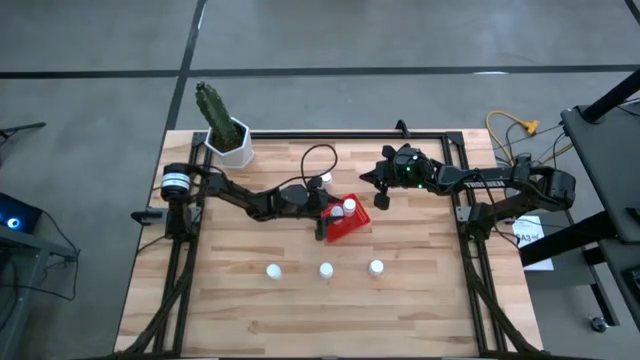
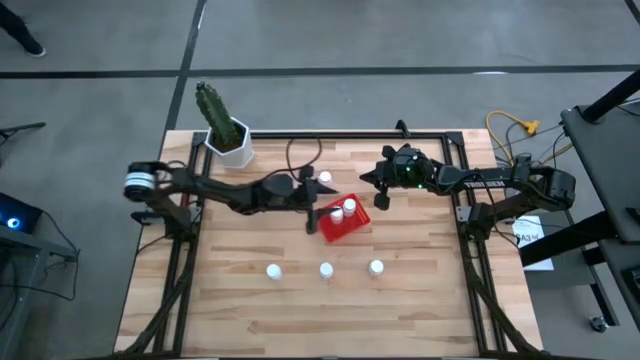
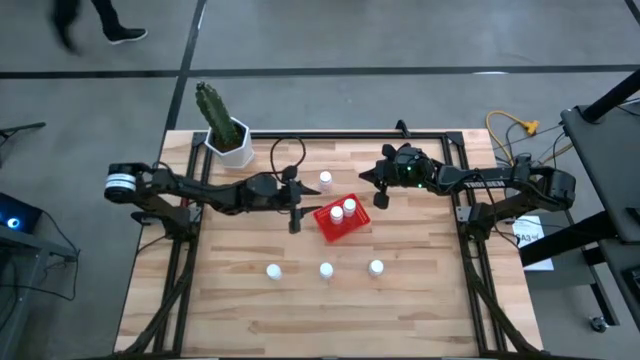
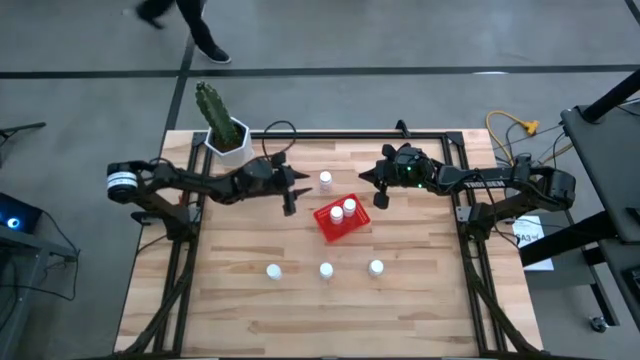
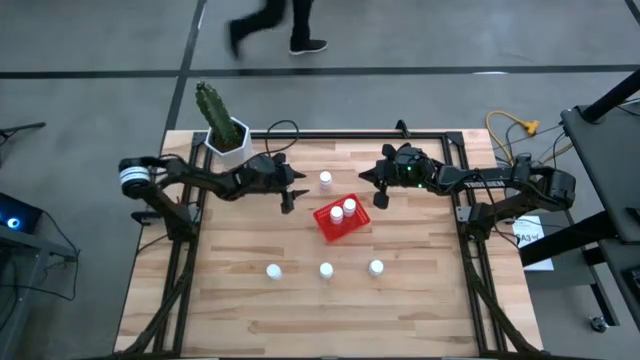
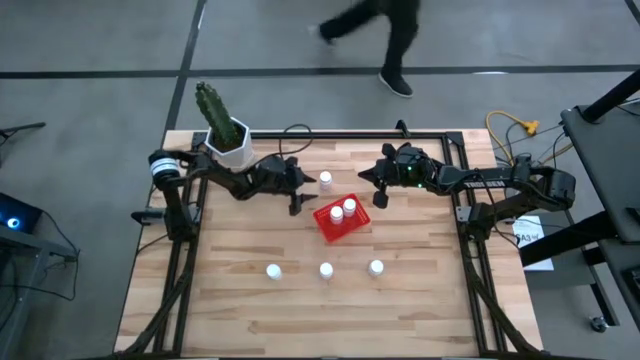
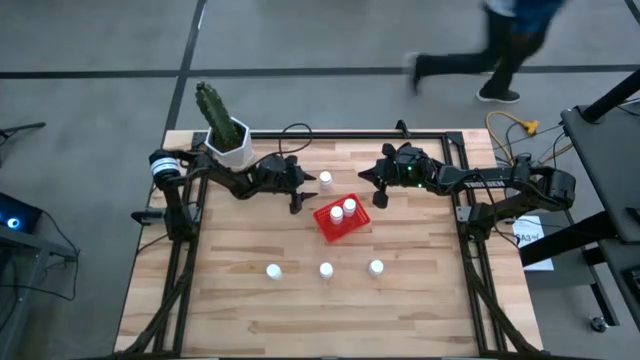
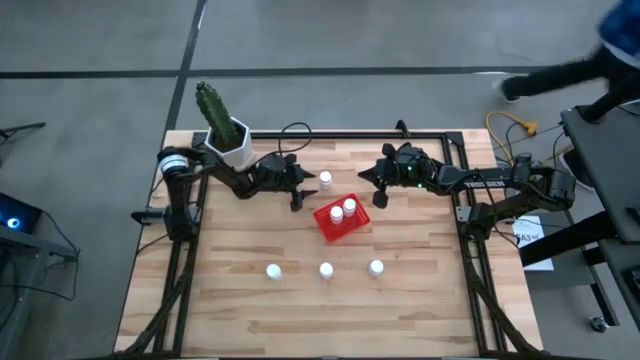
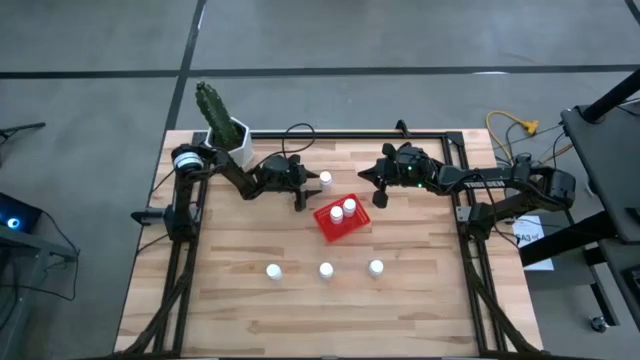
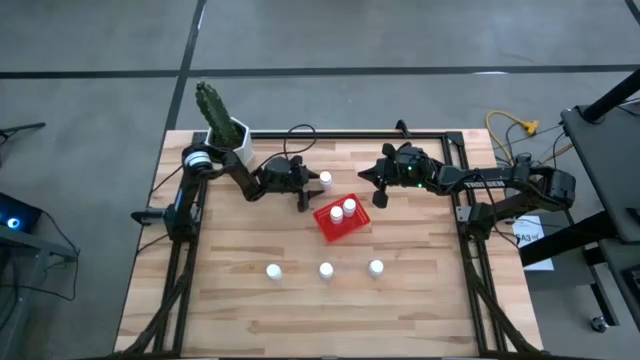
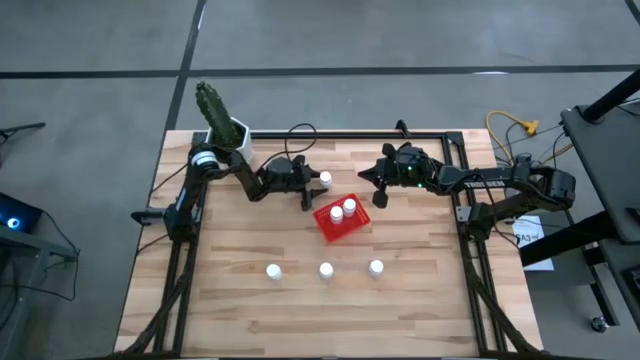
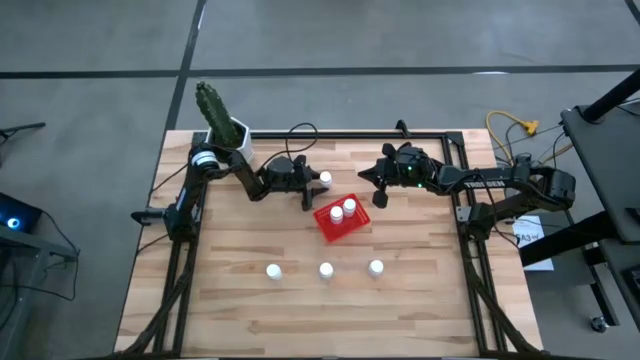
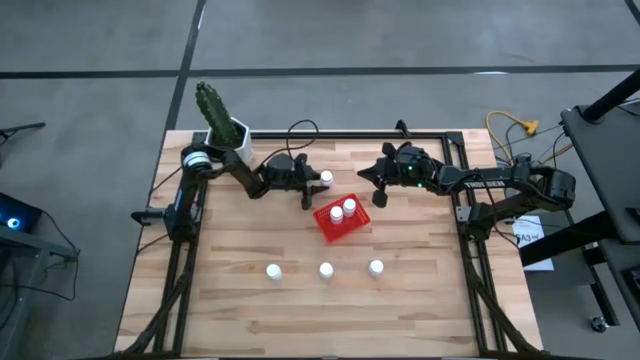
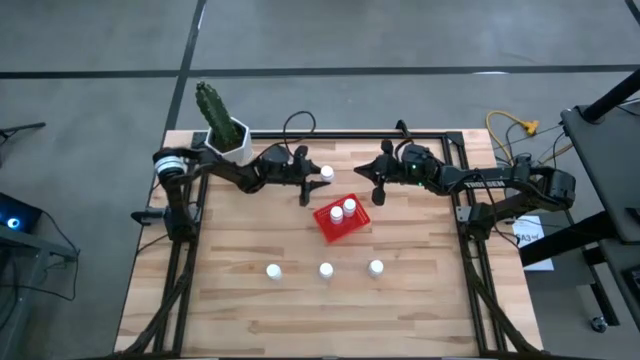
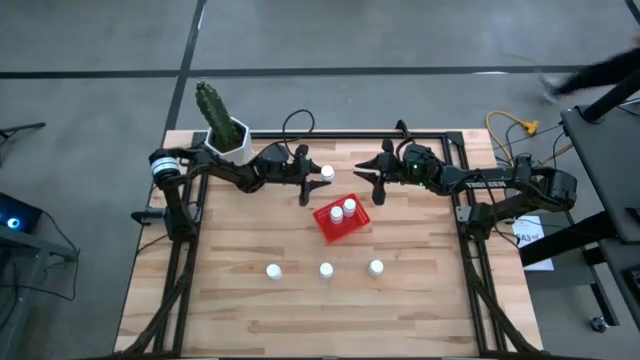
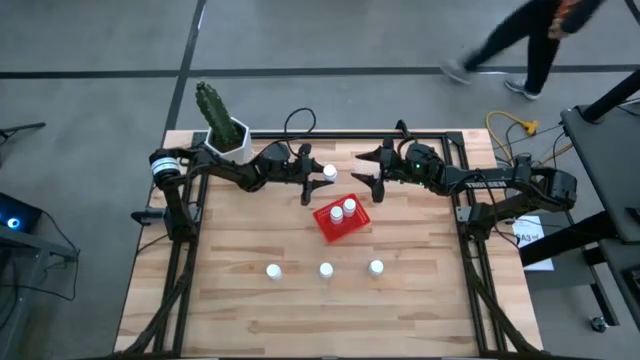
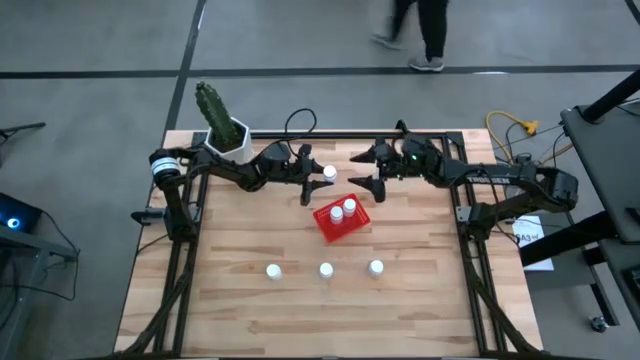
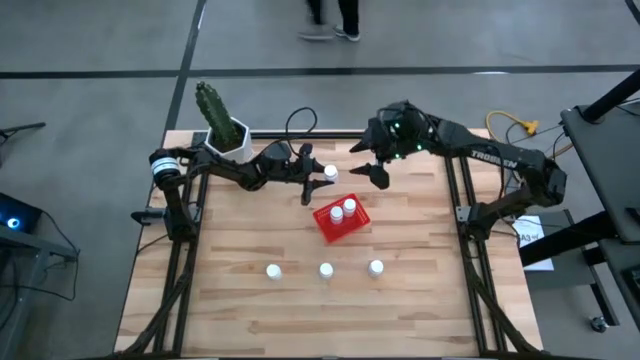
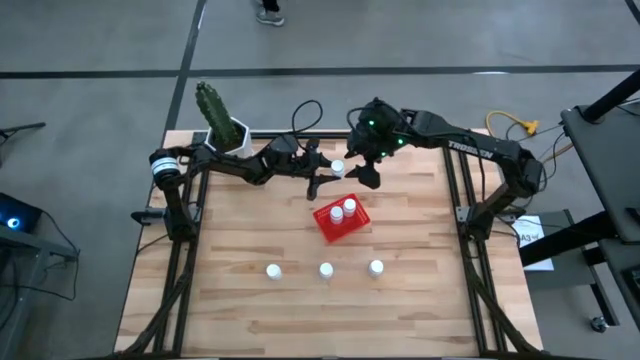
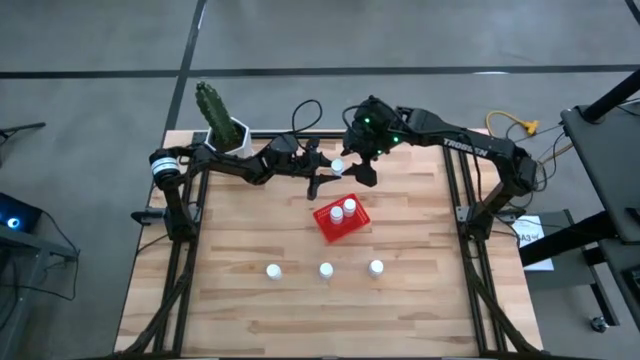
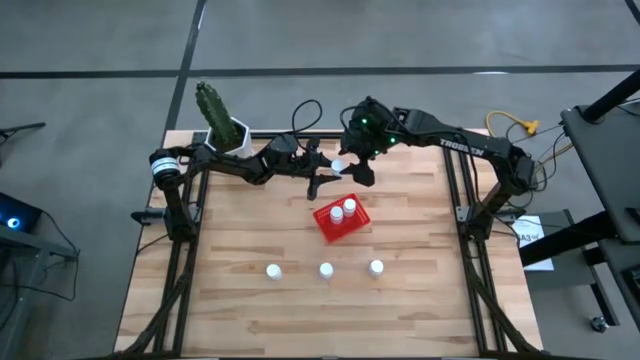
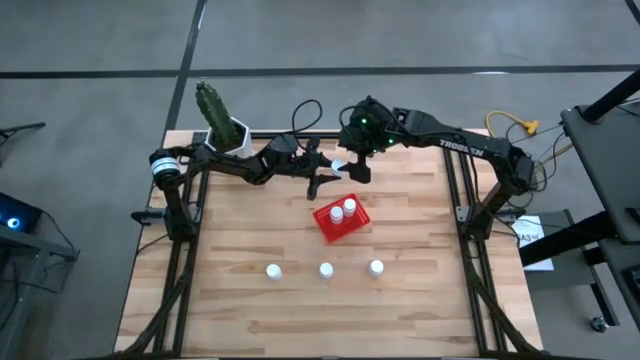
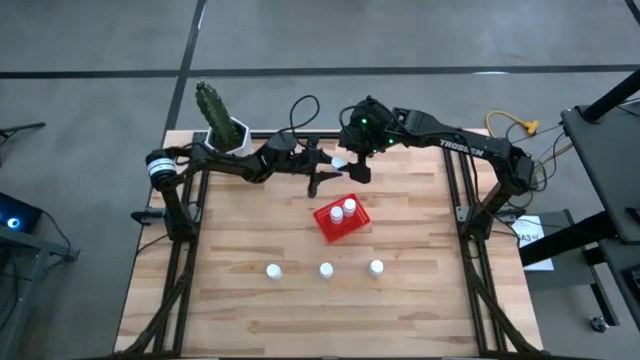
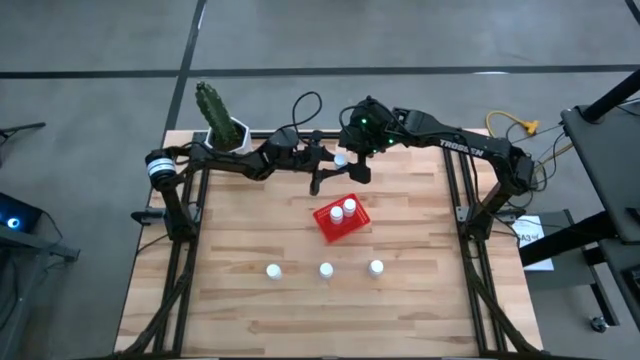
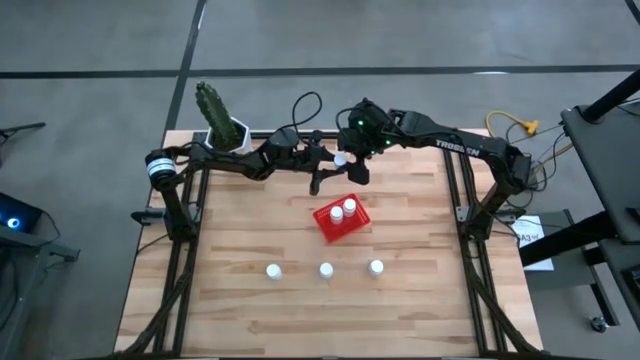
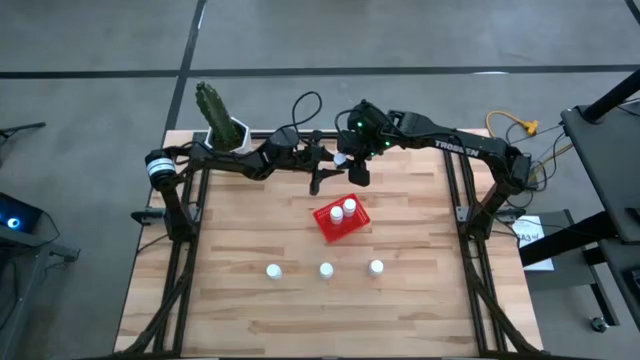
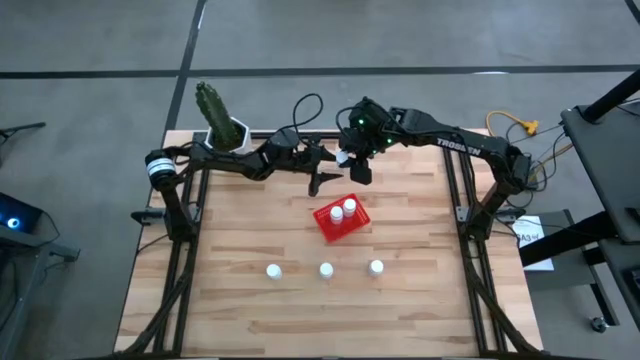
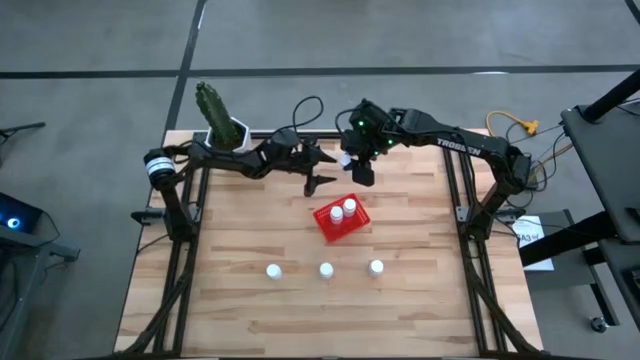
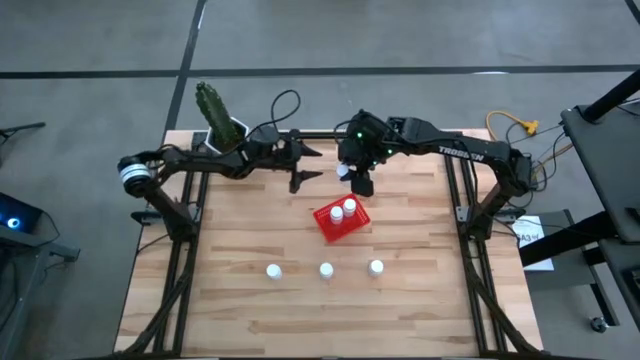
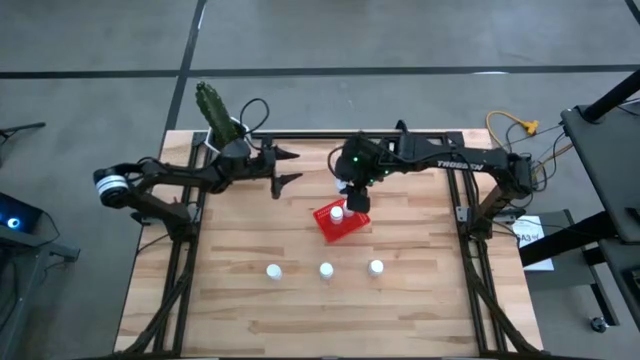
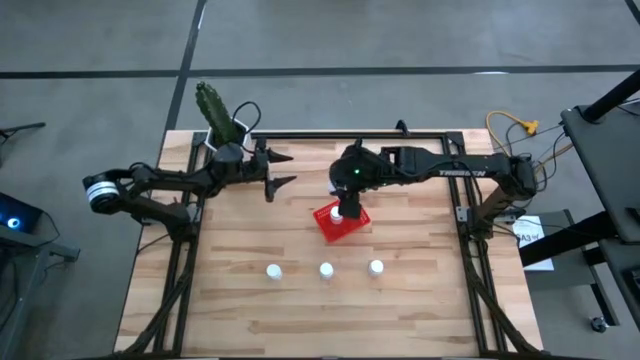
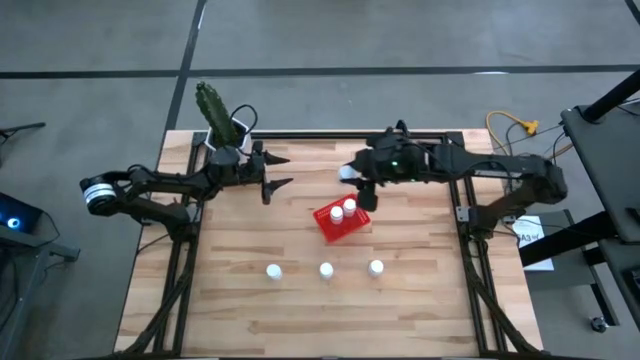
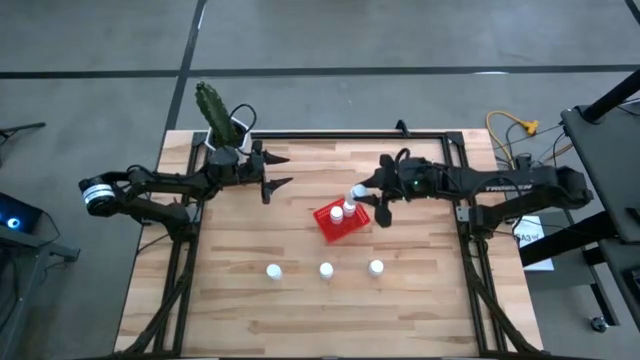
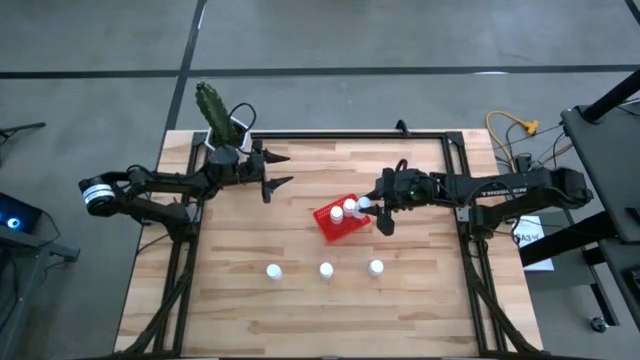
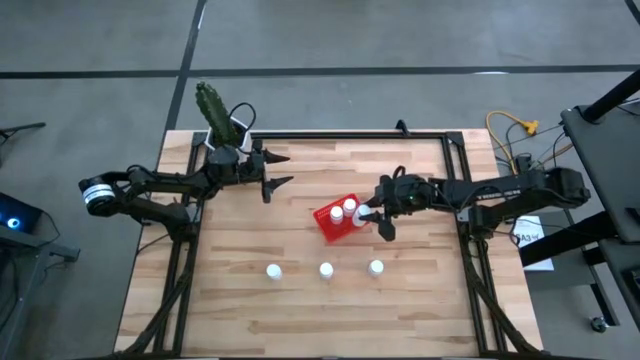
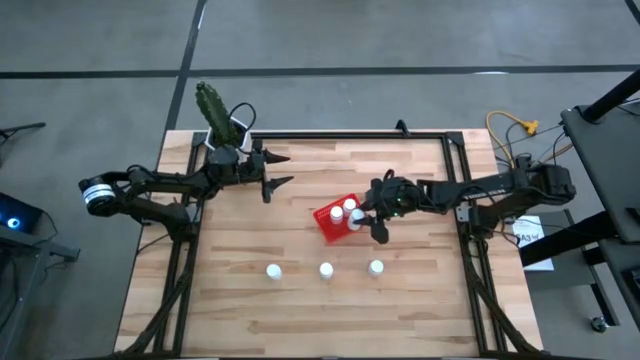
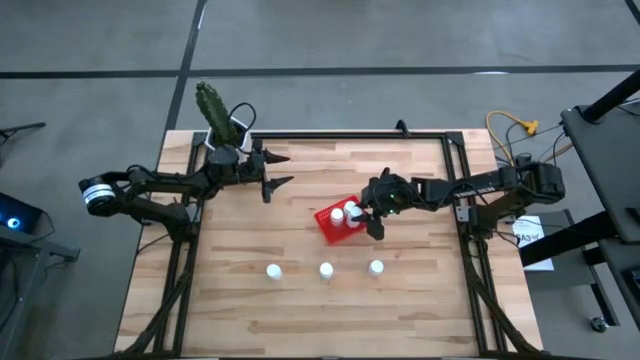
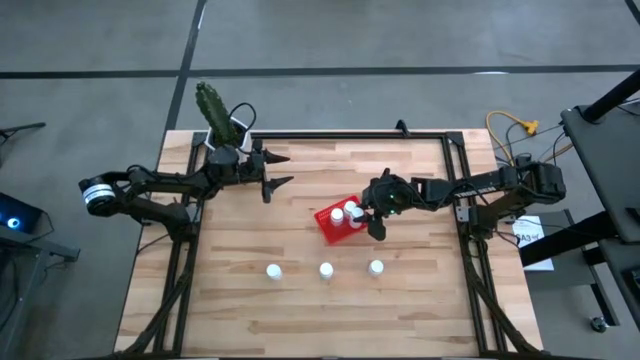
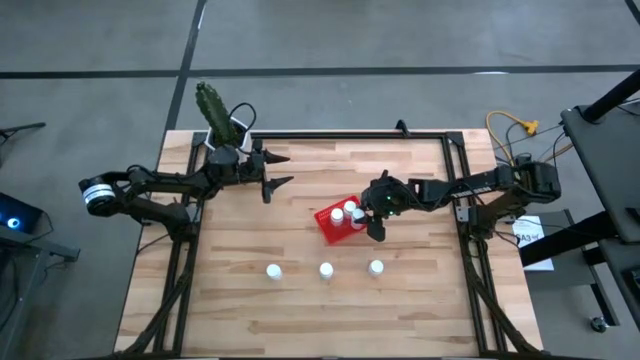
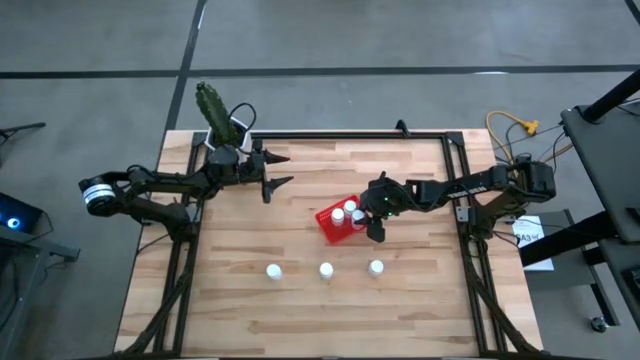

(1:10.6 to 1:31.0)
Task: Pick and place pill bottles into a basket
Put the white pill bottle into the red bin
